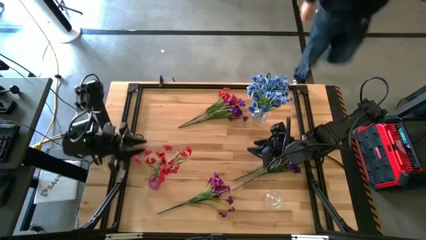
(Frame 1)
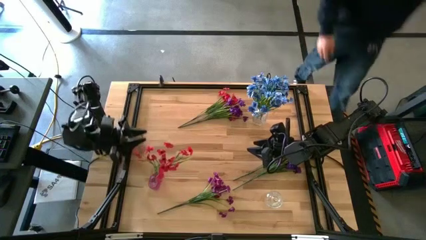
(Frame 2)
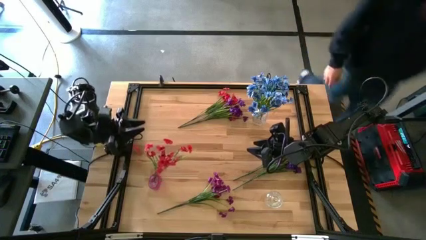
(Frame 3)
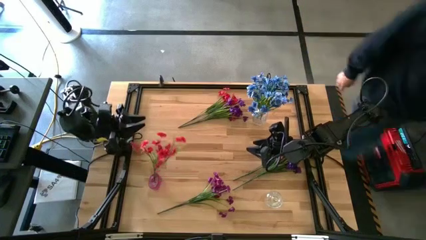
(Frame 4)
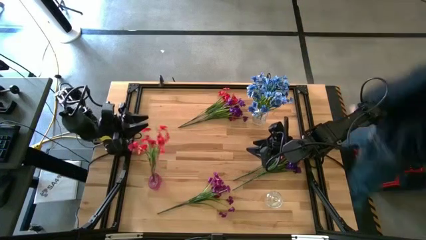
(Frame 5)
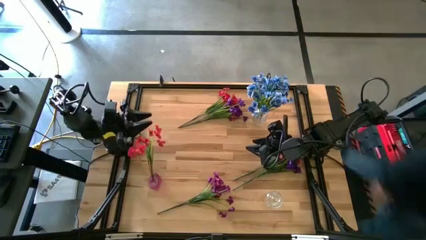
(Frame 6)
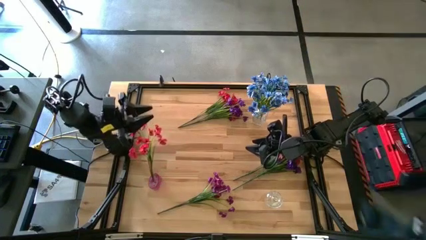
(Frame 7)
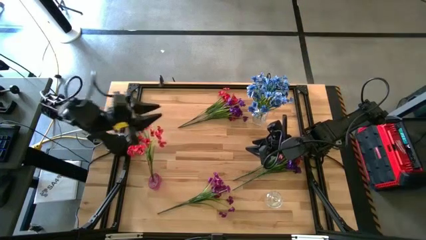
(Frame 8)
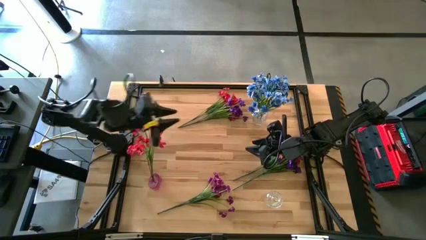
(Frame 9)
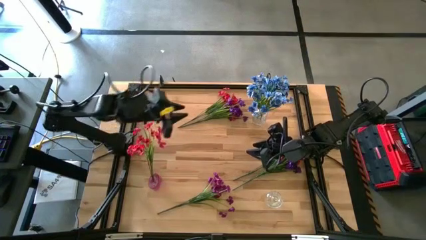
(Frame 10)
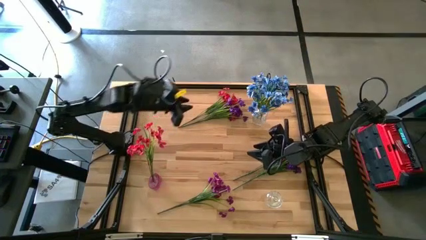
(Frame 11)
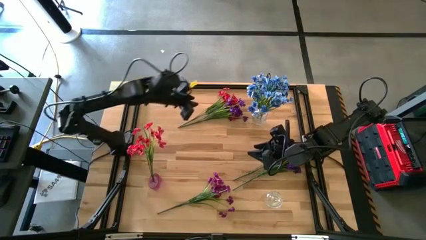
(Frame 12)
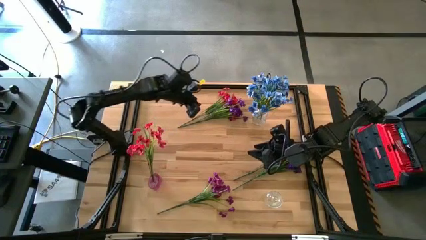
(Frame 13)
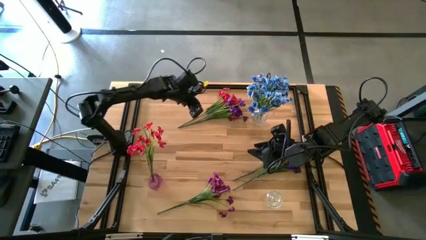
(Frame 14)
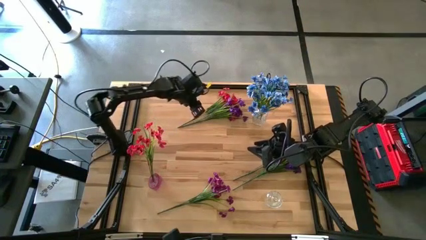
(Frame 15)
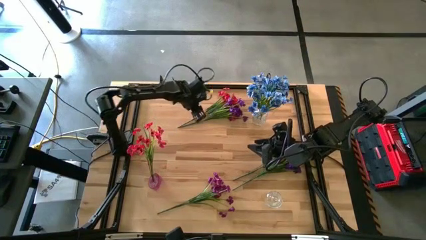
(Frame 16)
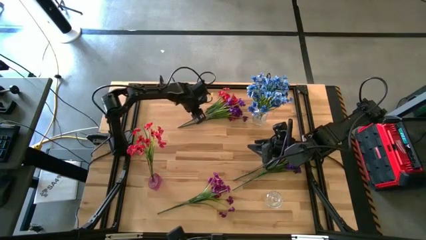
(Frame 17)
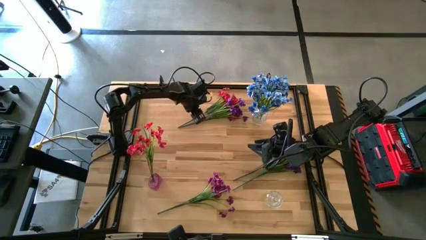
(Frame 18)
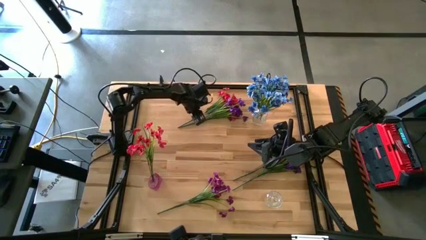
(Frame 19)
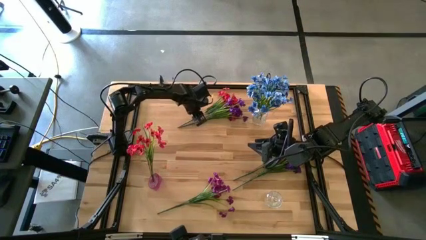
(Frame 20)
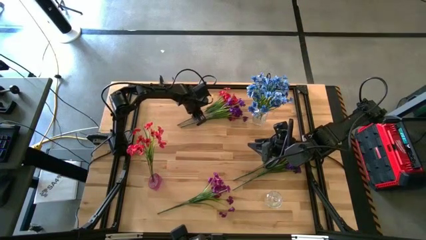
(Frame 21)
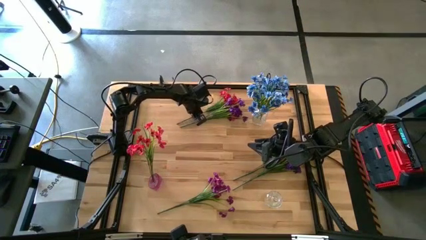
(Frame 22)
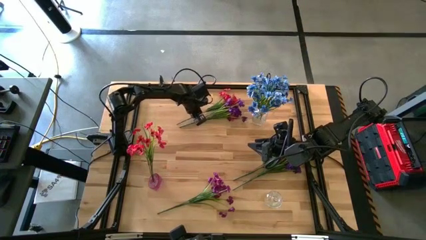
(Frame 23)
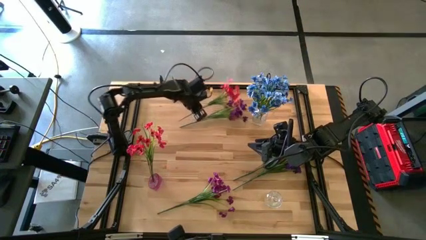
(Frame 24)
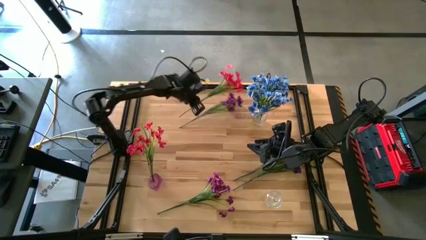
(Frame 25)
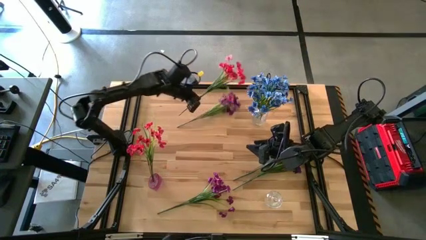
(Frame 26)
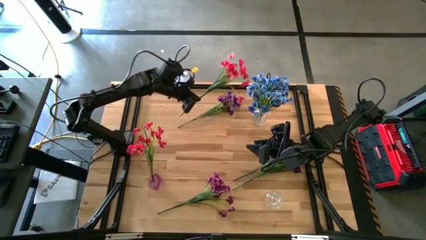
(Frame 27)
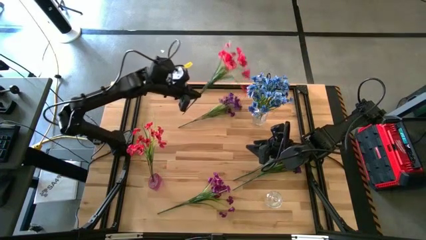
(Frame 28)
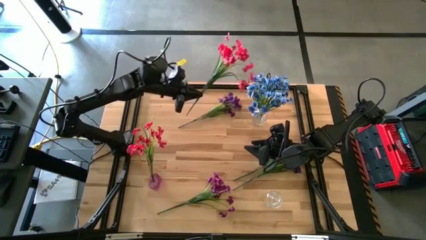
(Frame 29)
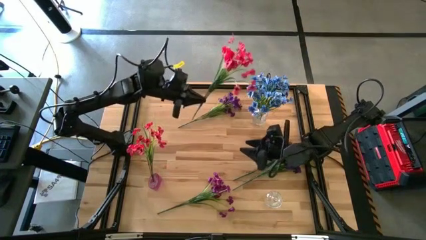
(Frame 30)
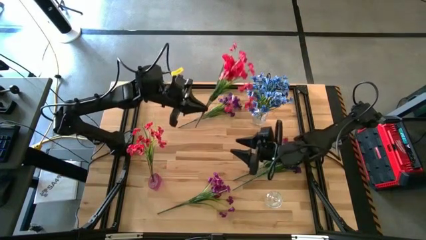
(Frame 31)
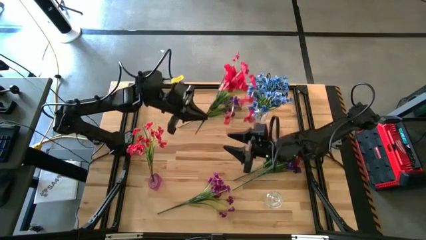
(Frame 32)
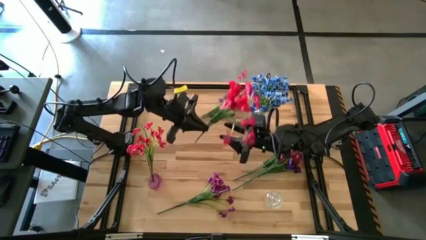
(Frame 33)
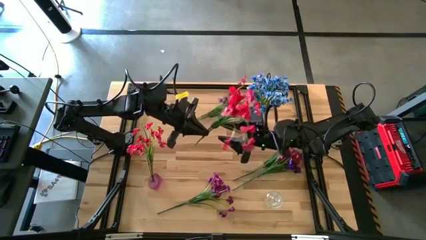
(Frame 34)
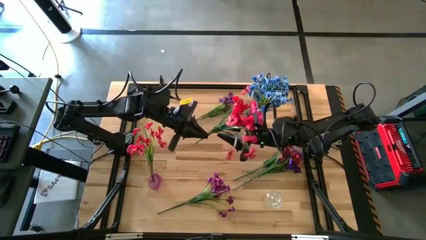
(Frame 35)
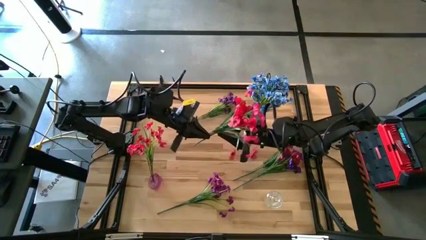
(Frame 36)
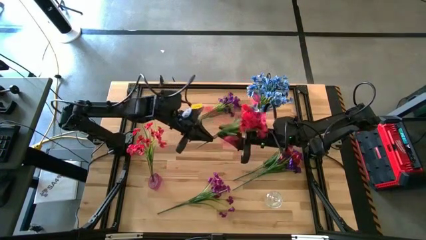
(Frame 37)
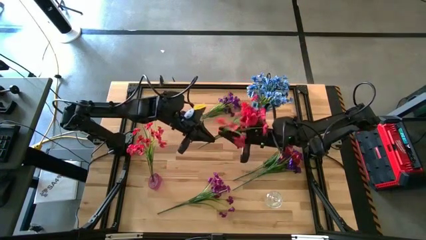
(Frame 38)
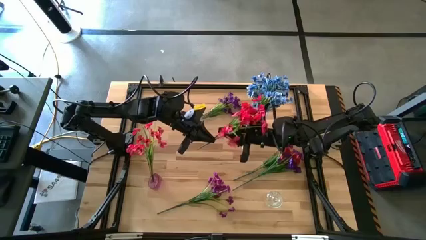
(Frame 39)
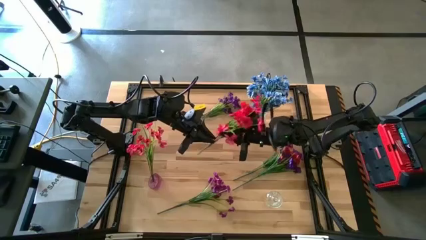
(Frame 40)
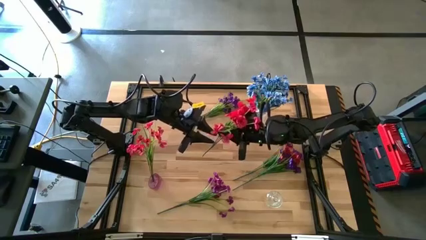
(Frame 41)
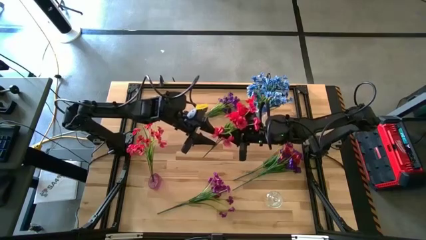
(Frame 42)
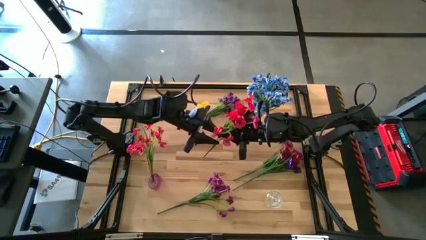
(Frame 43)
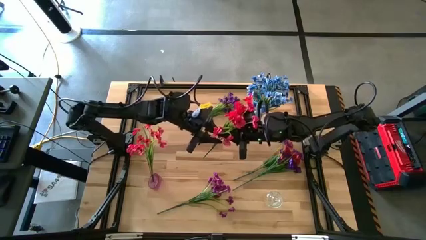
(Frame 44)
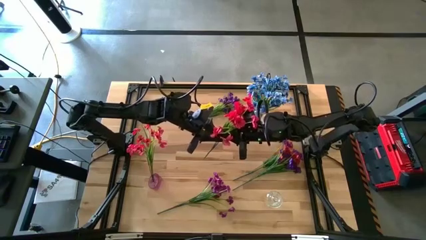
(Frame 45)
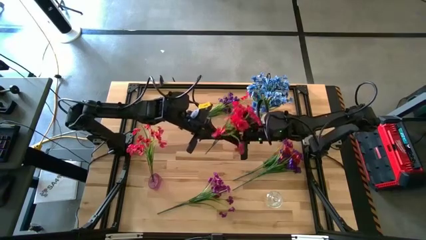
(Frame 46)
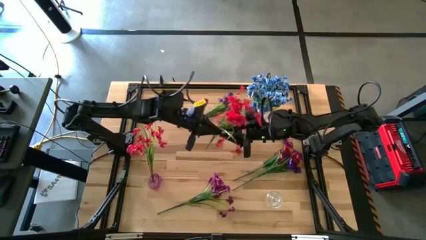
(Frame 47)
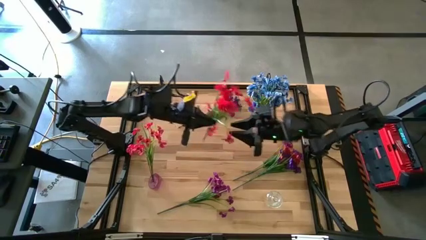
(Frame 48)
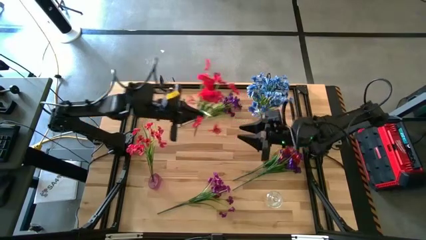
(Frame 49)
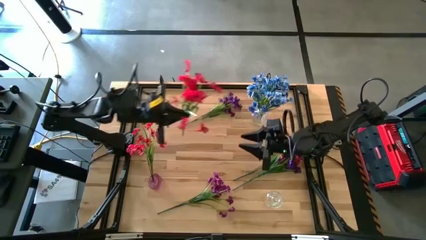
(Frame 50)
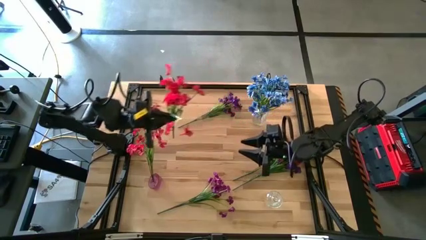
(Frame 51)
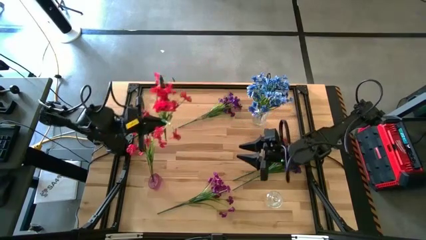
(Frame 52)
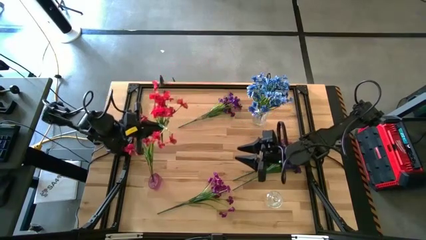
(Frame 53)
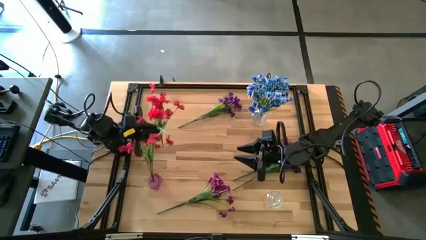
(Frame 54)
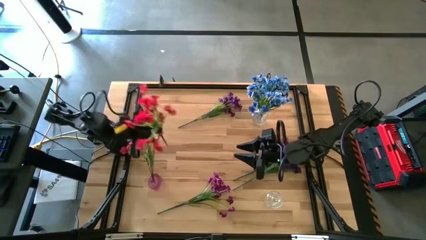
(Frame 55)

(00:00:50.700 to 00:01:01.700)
Task: Sort flowers into vase by color
Put the top red flower into the pink flower vase
